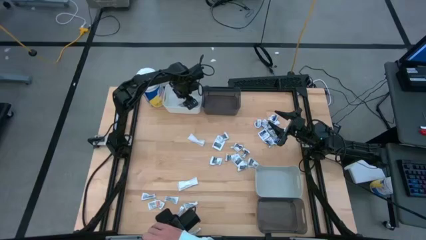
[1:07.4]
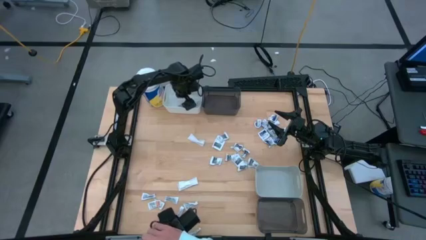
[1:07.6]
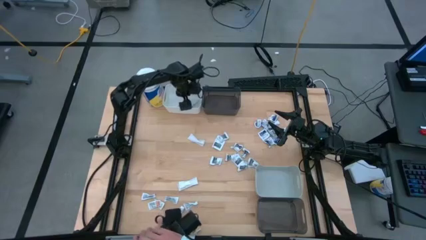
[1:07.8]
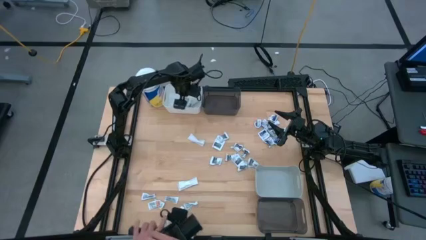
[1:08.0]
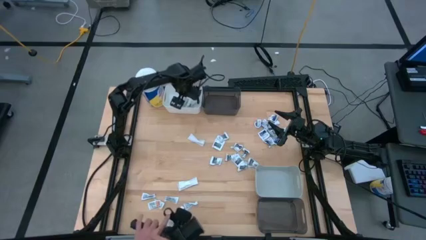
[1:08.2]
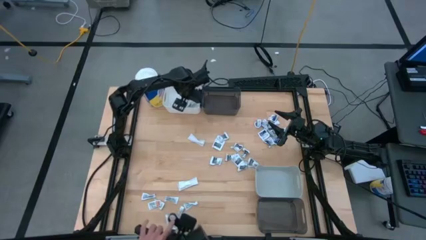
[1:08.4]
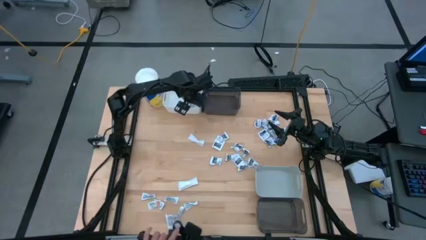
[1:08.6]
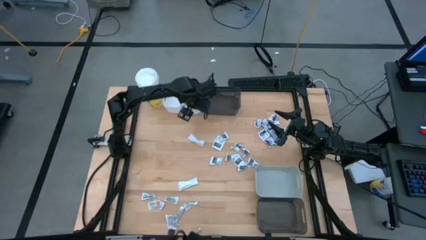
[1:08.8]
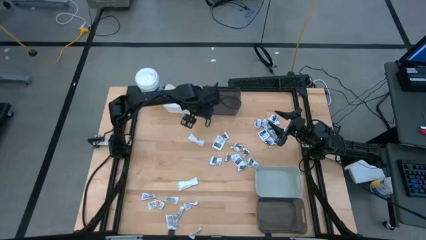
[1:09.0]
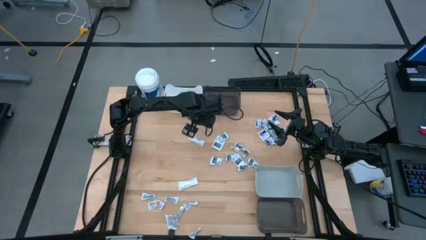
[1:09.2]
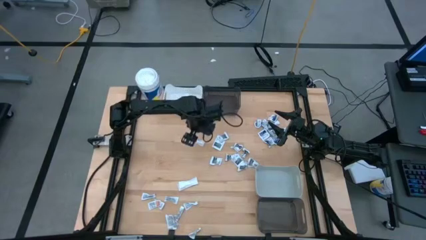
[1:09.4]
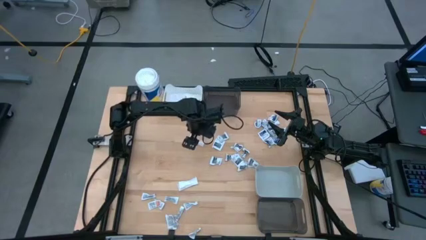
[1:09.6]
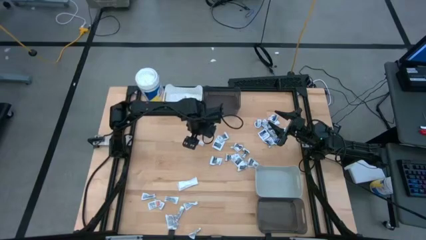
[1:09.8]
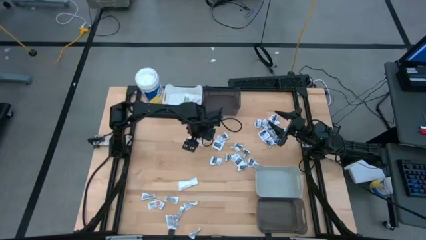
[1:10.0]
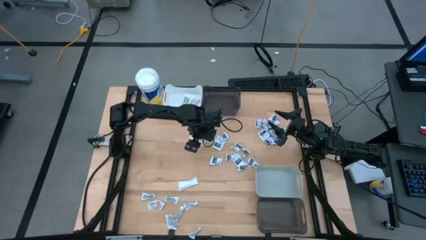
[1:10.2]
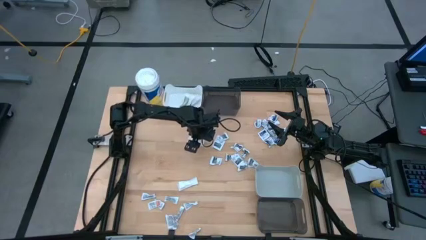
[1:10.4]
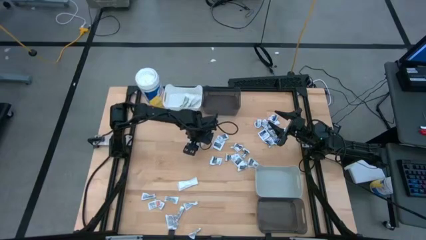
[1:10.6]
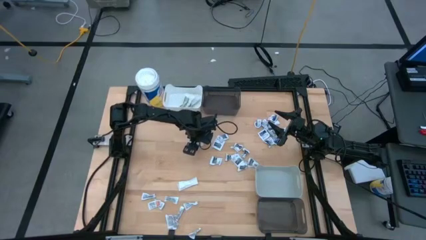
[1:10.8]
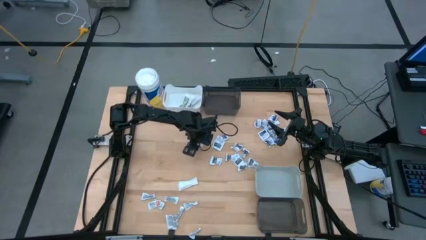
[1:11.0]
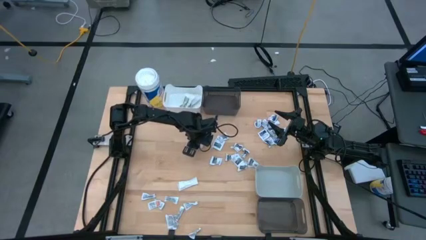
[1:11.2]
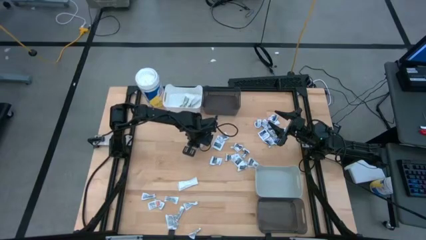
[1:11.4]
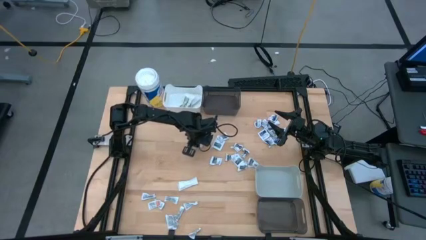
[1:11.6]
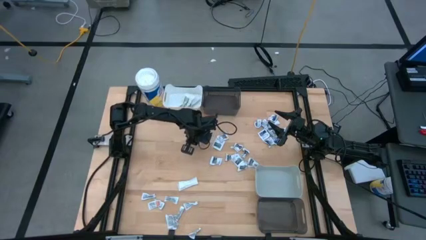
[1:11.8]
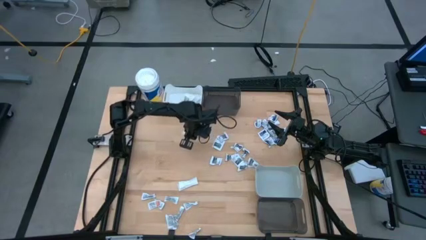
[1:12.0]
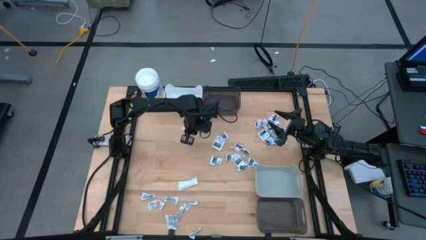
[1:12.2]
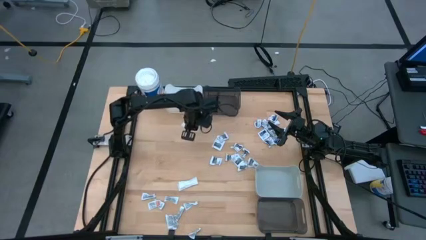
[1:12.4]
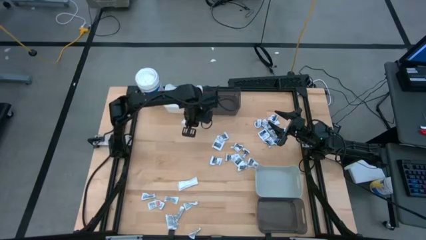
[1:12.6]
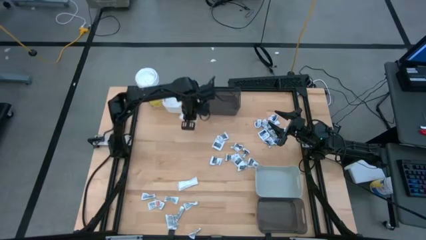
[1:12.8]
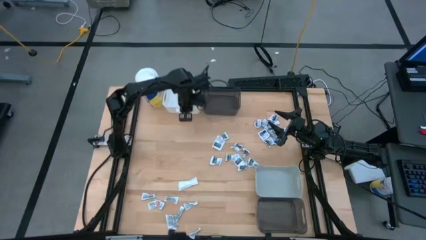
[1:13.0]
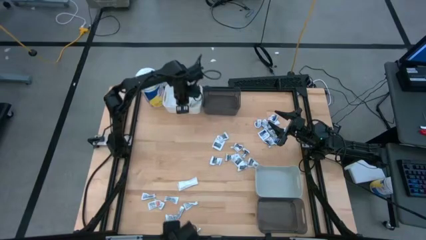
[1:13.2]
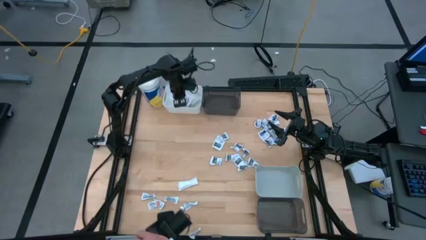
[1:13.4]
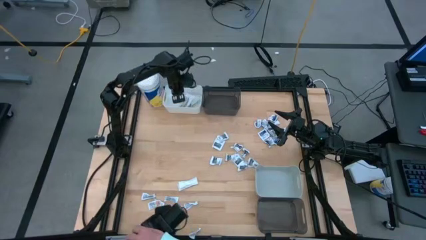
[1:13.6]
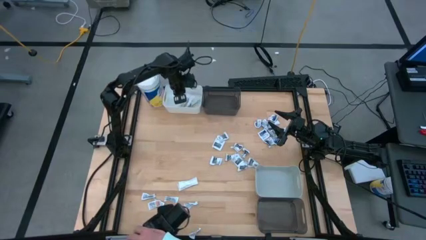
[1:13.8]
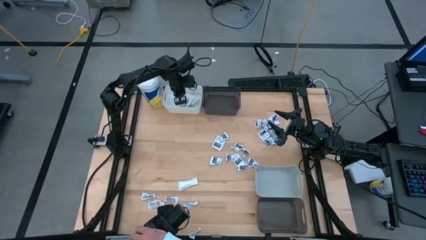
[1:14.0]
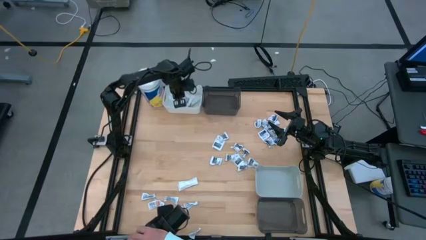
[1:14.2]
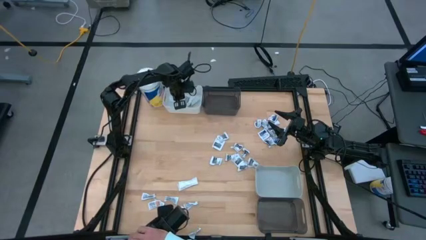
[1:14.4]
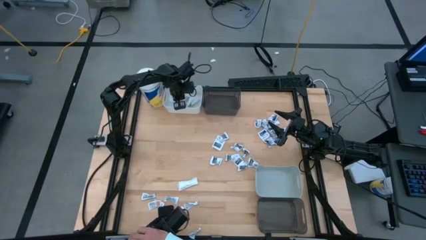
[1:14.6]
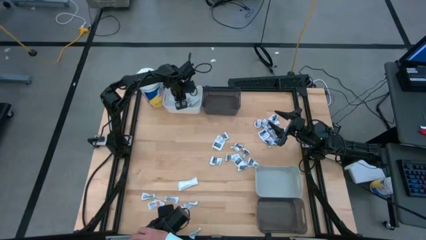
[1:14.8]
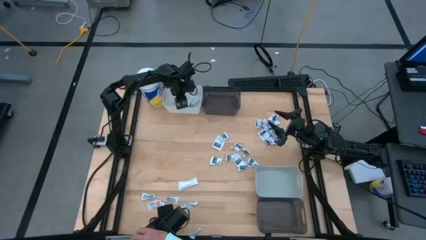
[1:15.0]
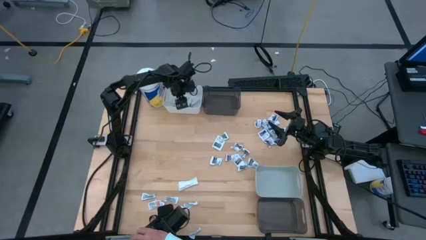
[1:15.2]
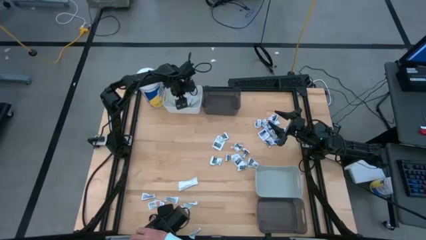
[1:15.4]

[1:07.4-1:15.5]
Task: Pick & Place First Aid Supplies
Put the green bandage into the white bin

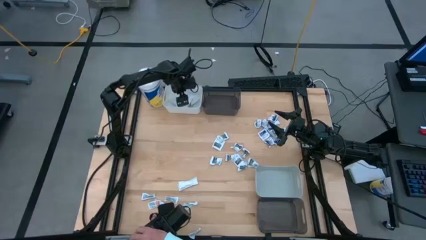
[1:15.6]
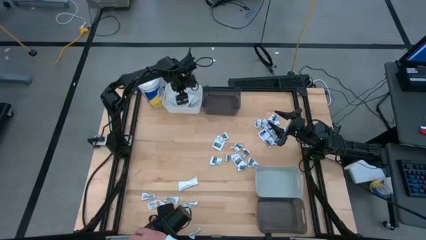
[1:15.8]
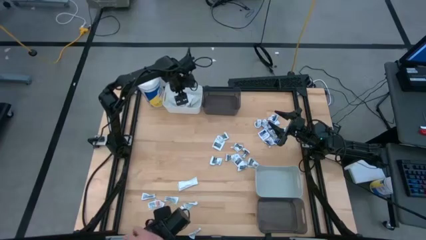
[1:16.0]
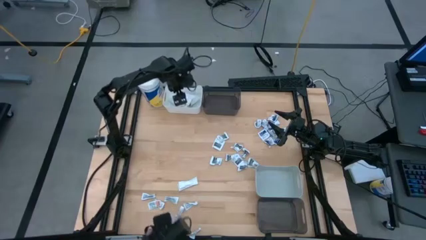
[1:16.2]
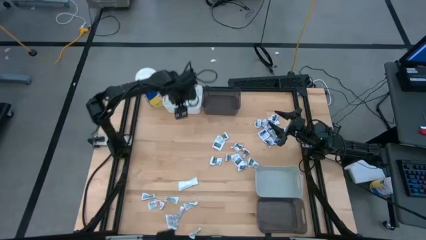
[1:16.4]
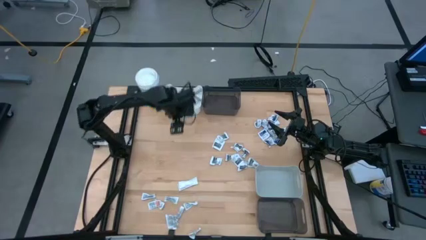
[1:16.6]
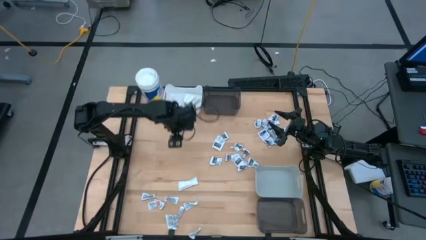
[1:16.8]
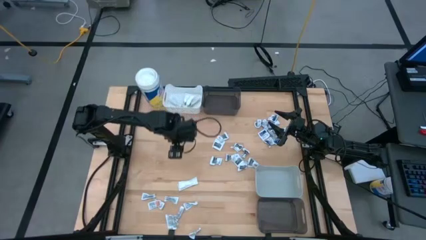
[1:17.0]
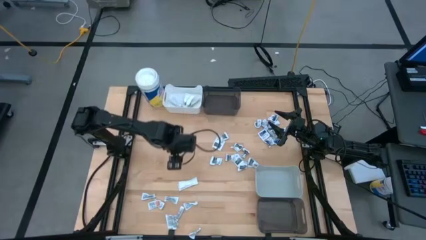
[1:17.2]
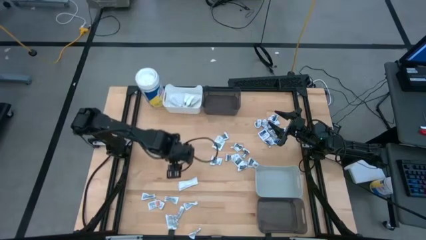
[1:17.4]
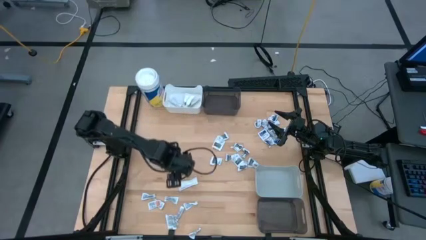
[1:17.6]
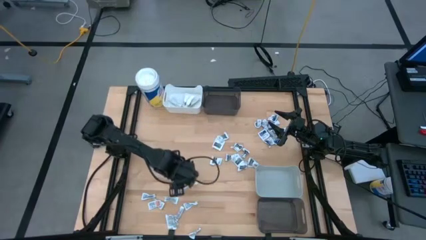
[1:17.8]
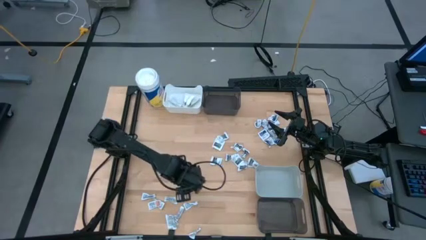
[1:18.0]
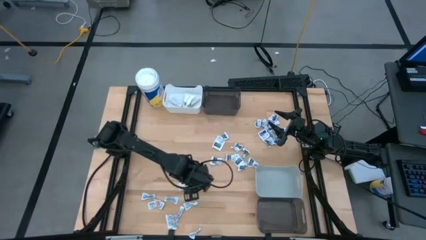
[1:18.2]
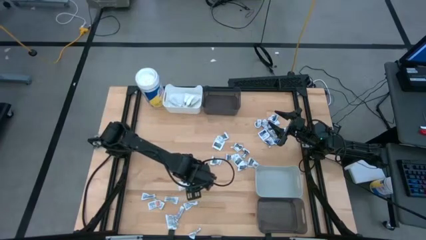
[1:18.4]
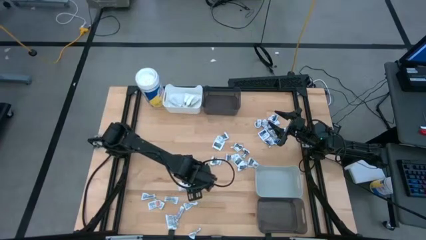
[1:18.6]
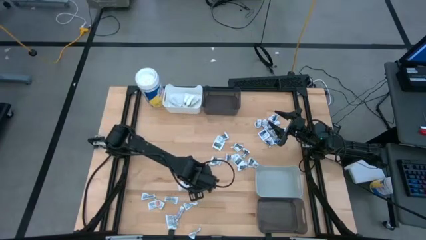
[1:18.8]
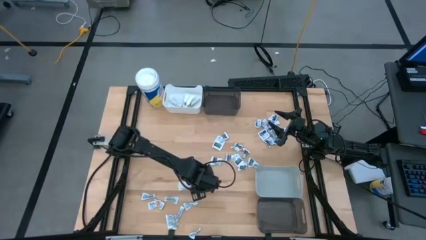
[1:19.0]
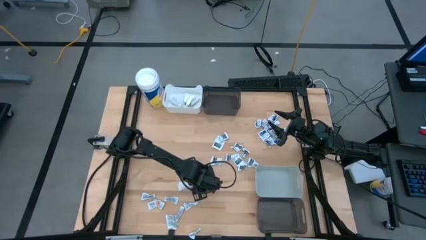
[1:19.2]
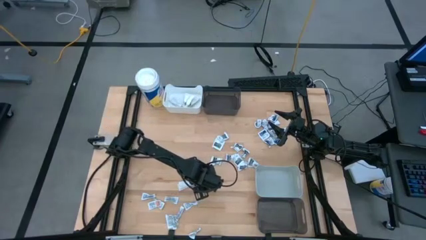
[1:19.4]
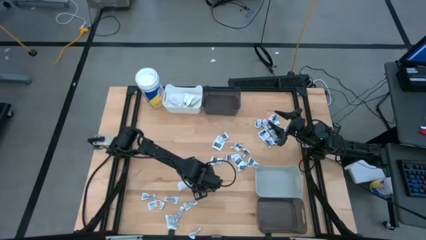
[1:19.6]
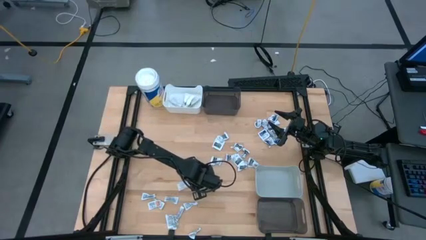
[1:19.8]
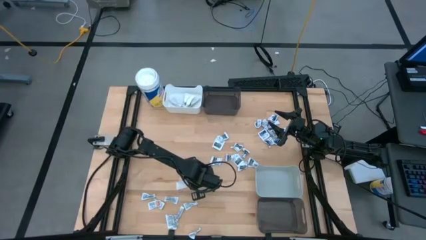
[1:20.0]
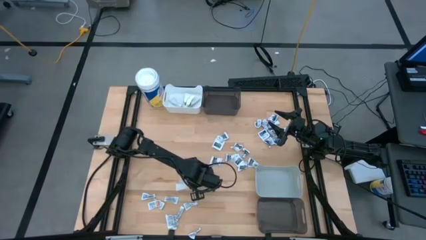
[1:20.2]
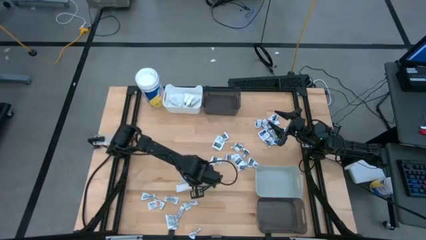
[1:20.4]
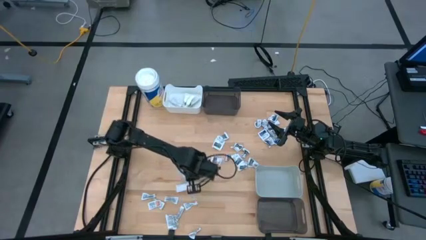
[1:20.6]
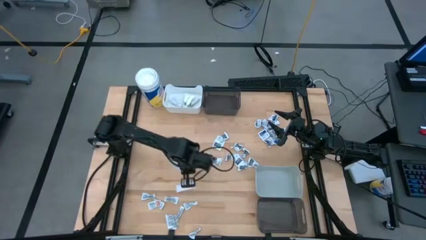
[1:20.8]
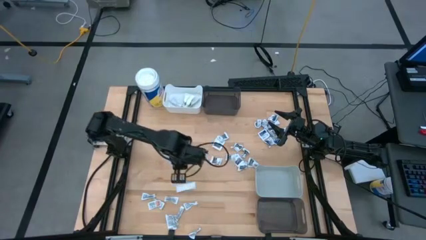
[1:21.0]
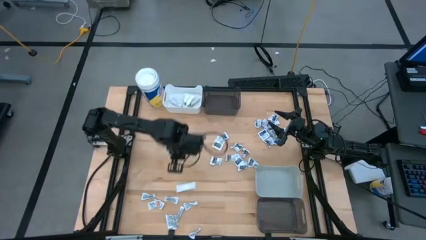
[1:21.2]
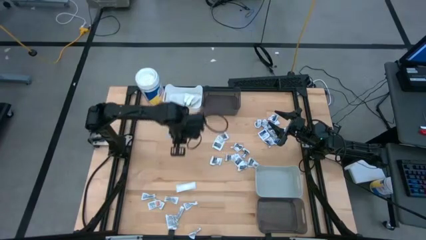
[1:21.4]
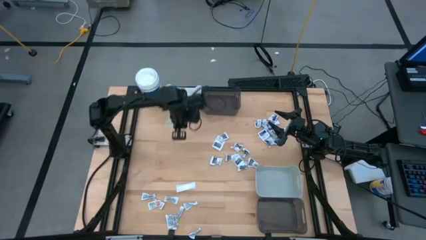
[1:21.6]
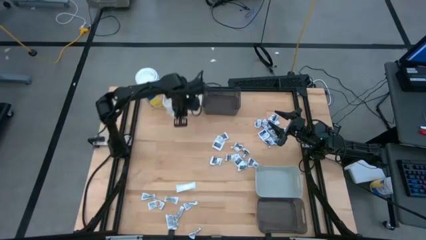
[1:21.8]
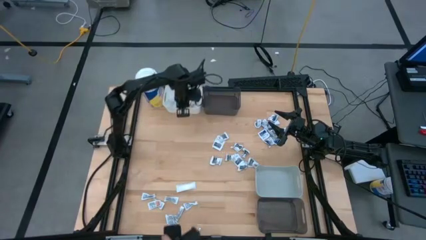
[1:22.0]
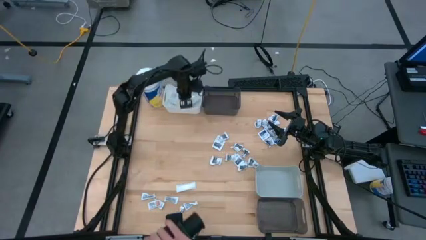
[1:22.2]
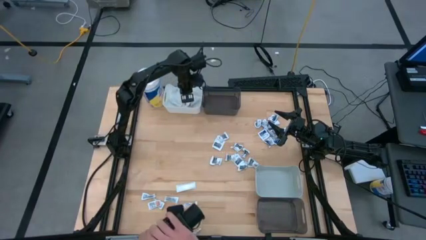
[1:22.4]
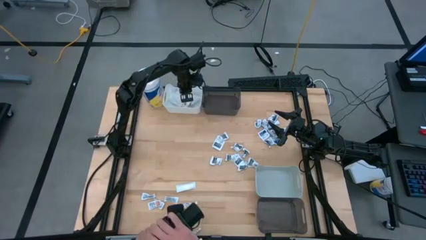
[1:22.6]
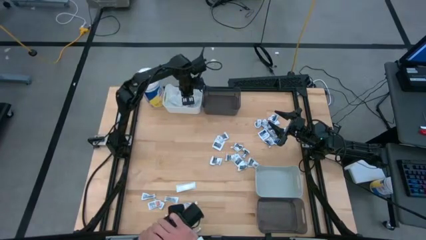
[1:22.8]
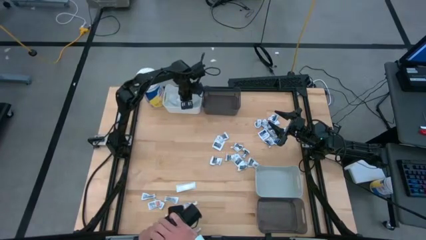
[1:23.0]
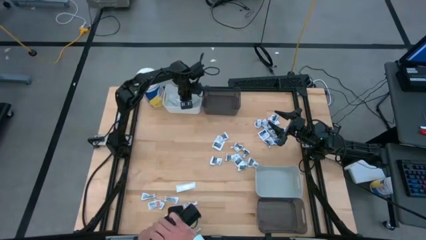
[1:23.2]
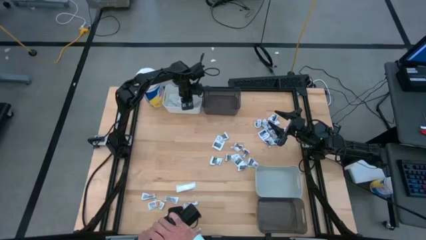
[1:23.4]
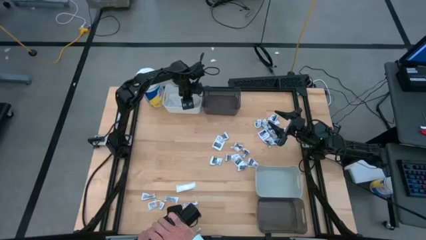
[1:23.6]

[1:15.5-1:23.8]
Put the green bandage into the white bin
